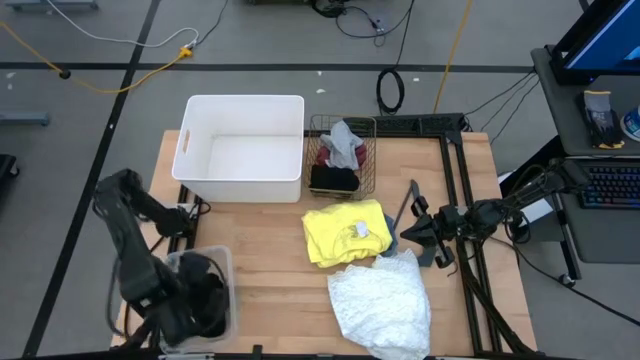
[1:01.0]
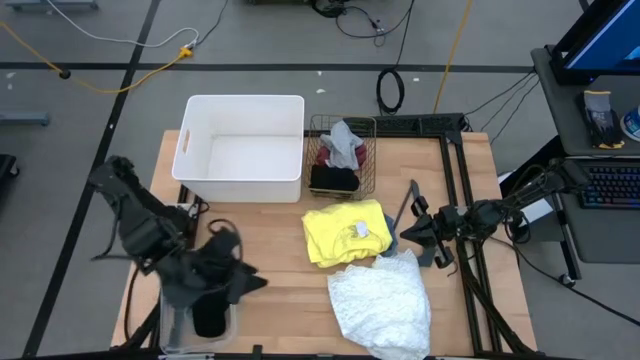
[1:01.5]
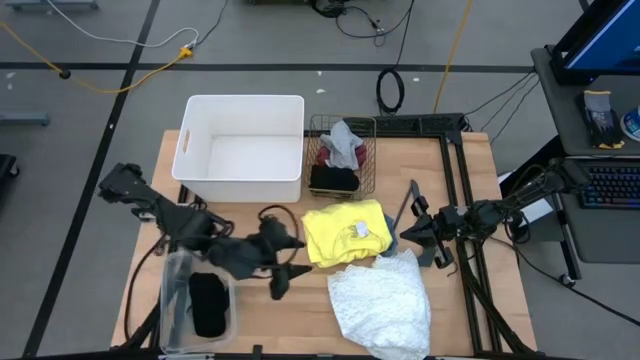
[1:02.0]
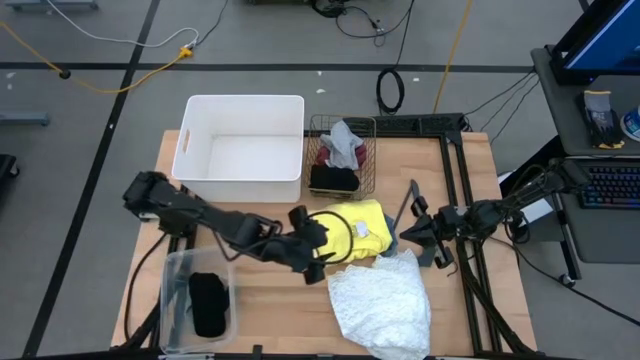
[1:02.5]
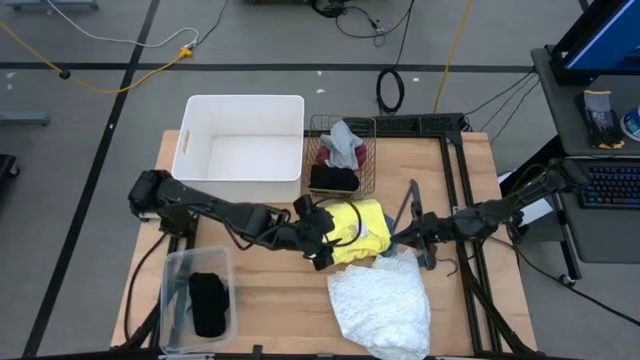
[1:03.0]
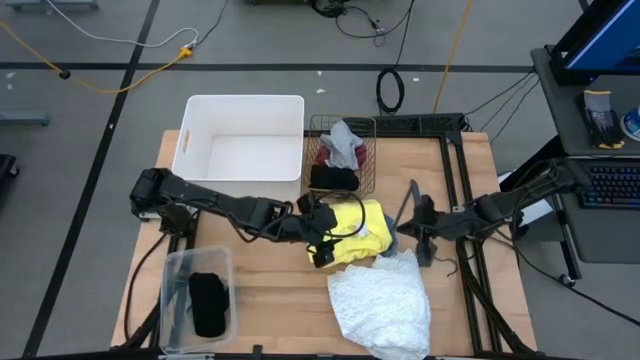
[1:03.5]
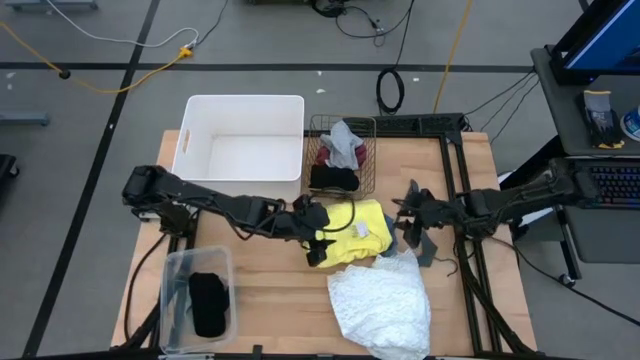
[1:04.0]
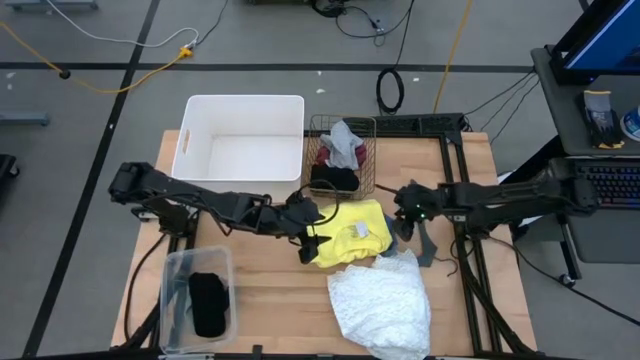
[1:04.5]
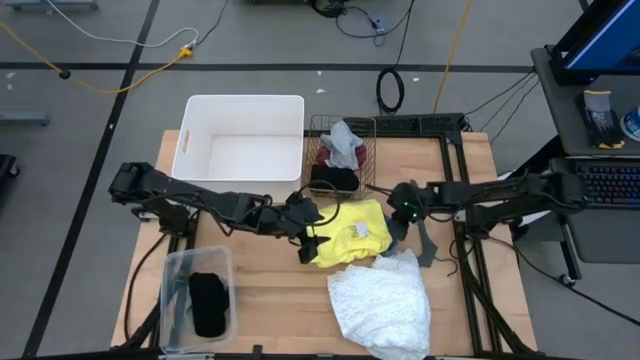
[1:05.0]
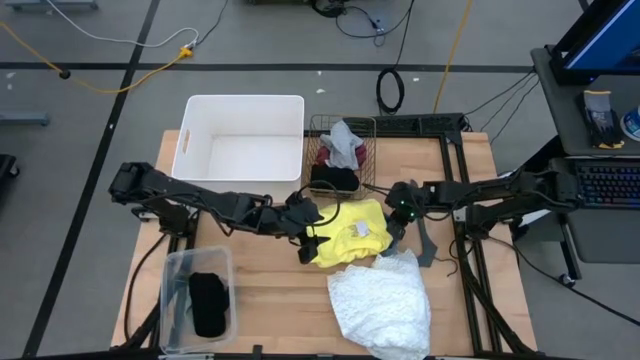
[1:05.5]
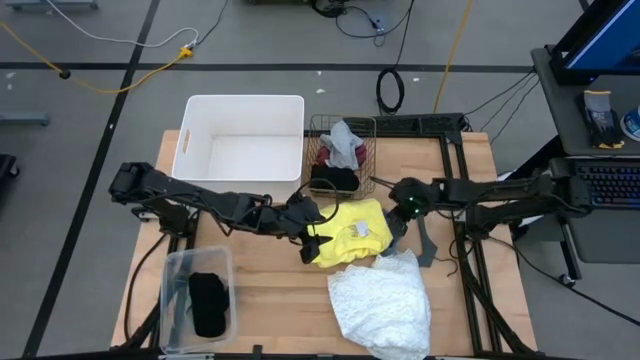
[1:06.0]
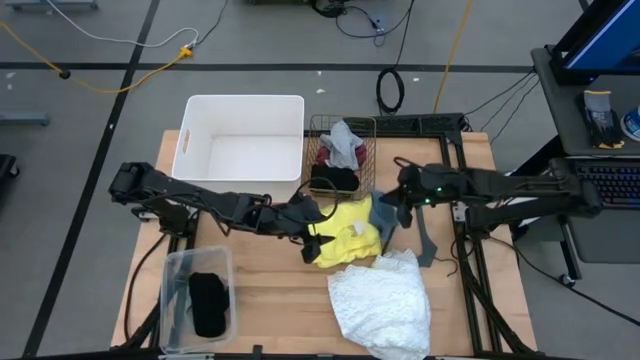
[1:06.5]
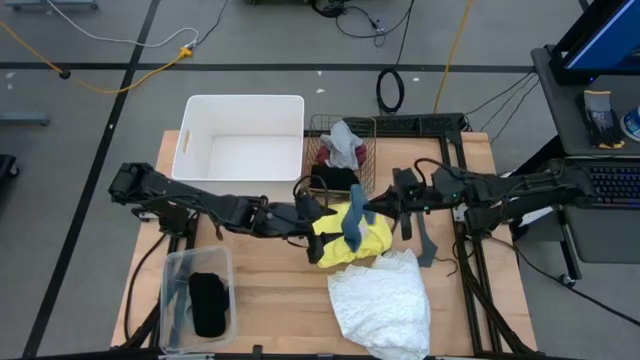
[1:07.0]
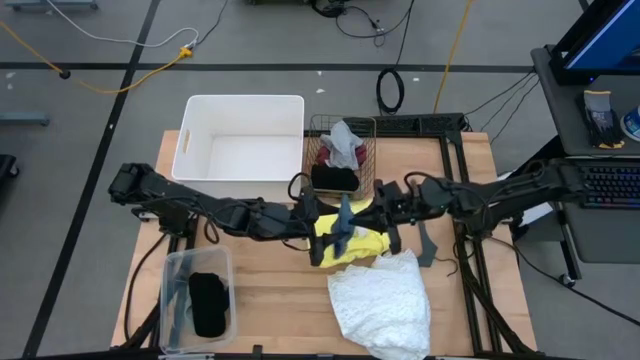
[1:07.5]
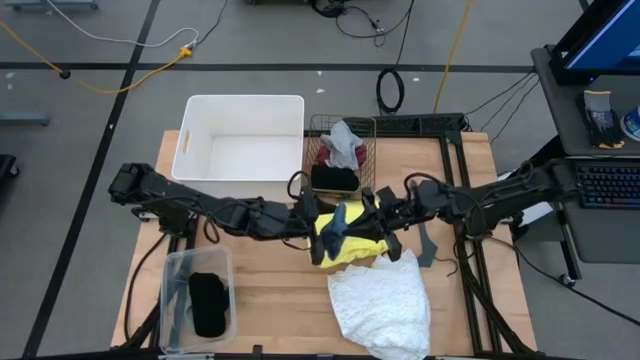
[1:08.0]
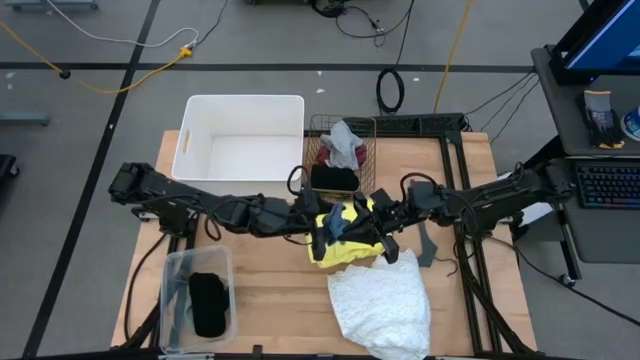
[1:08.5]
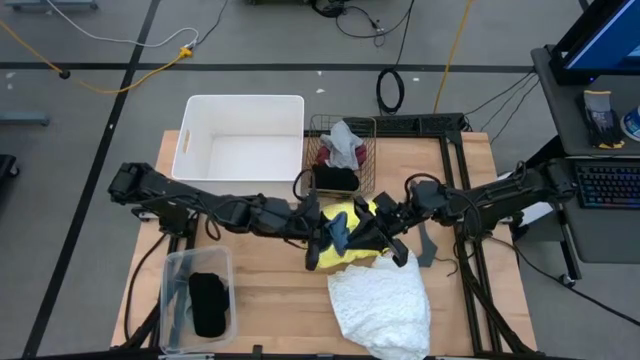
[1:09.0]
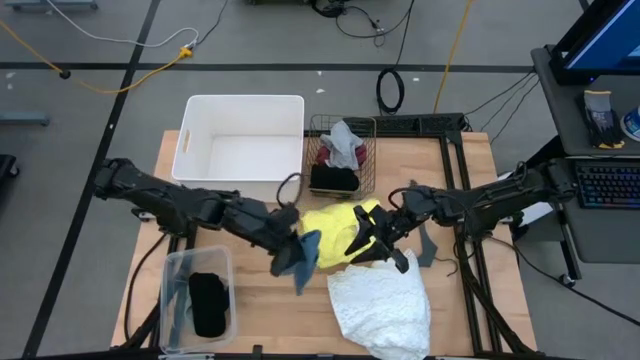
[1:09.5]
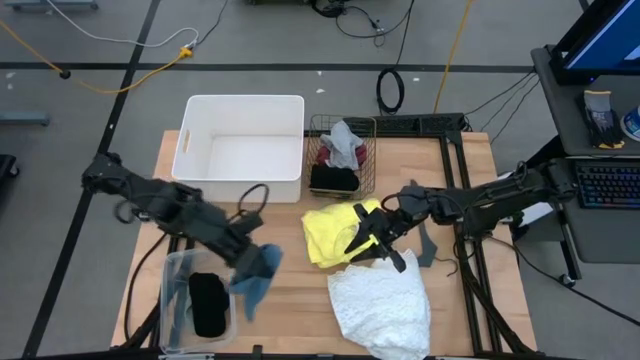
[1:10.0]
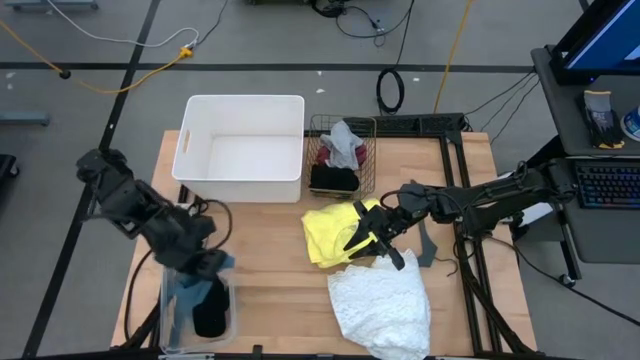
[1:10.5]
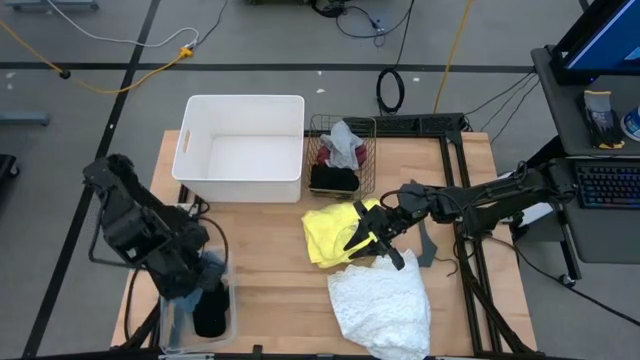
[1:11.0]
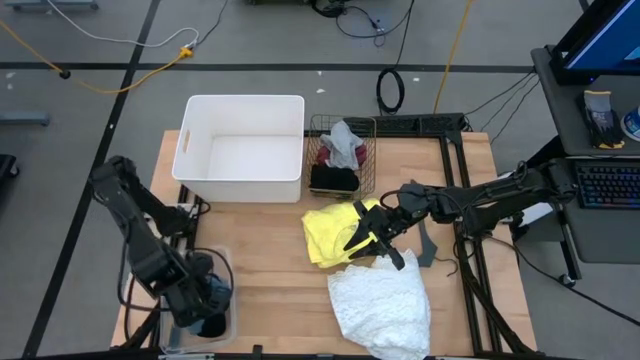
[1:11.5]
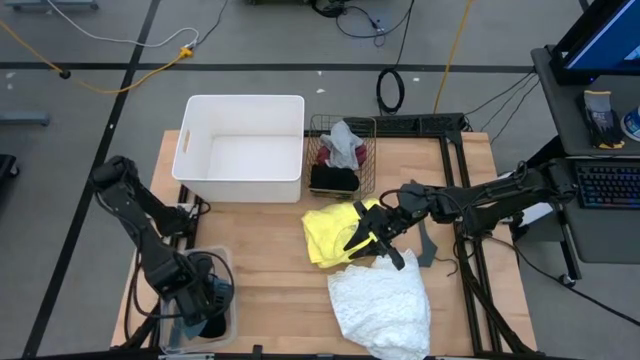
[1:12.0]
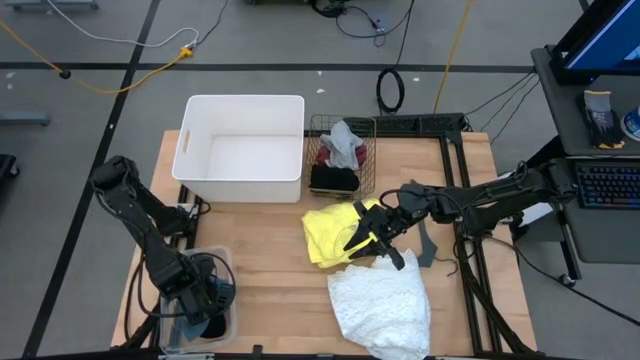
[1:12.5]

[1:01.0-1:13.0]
Task: Pick & Place Cloths
Put the gray sock into the transparent bin

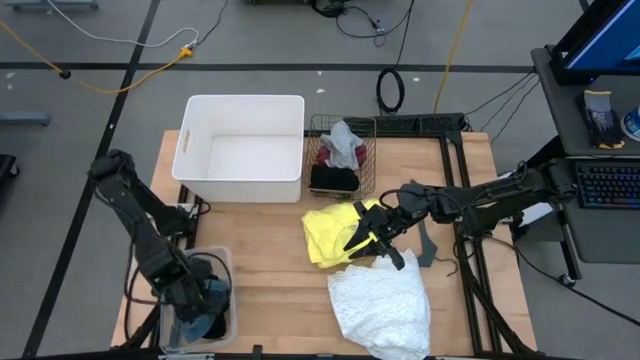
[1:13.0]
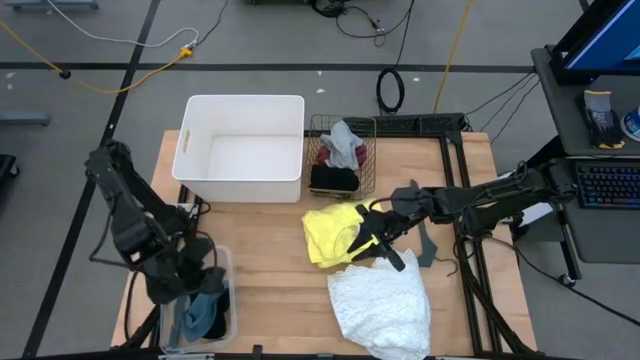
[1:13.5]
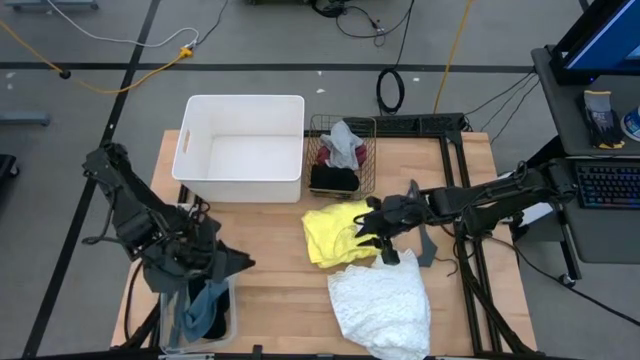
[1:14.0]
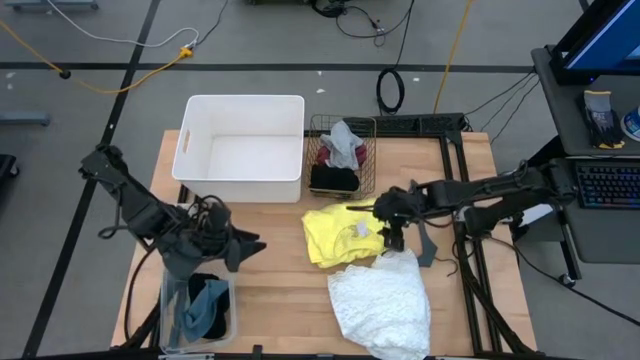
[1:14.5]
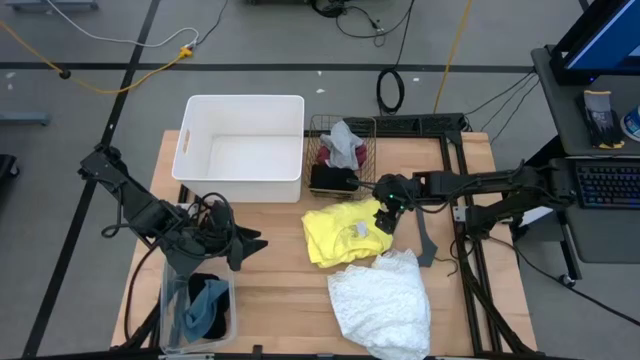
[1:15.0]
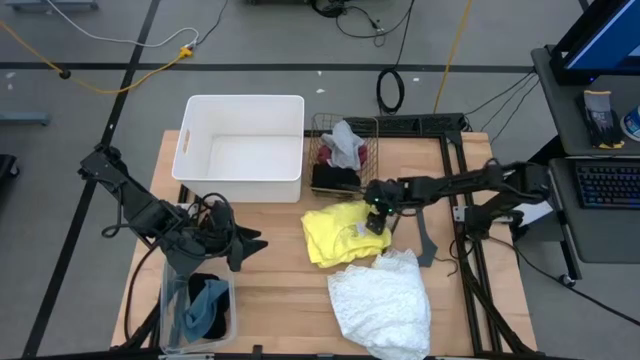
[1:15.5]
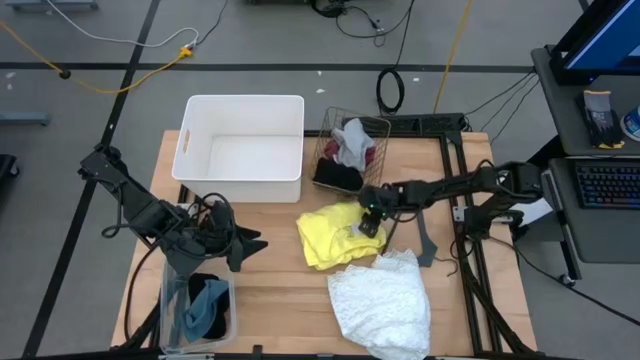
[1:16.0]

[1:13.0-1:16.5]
Put the yellow sweater into the white bin

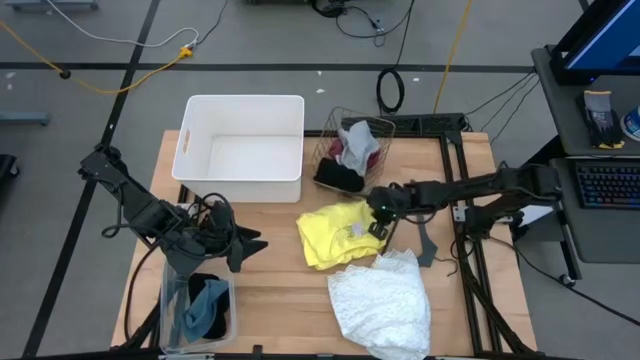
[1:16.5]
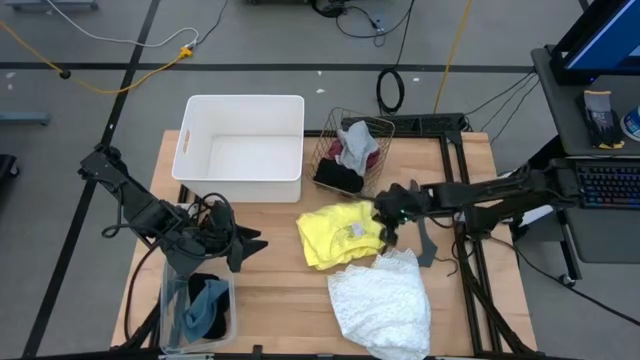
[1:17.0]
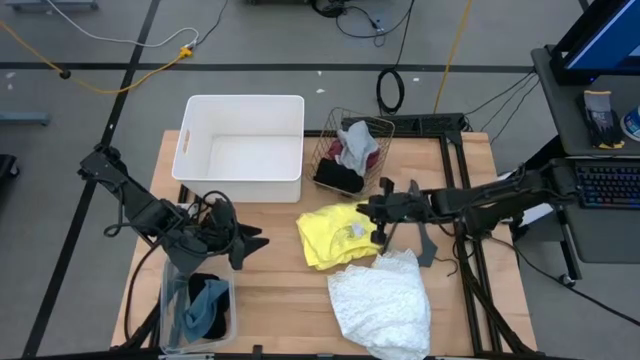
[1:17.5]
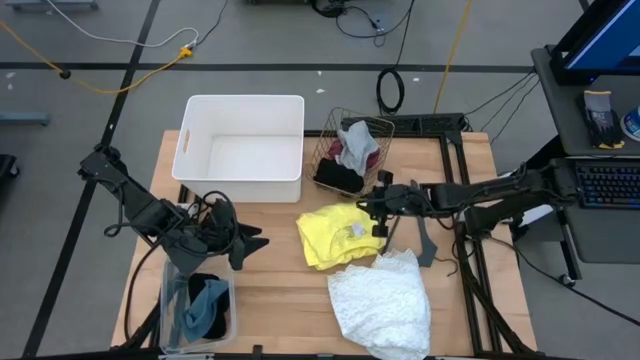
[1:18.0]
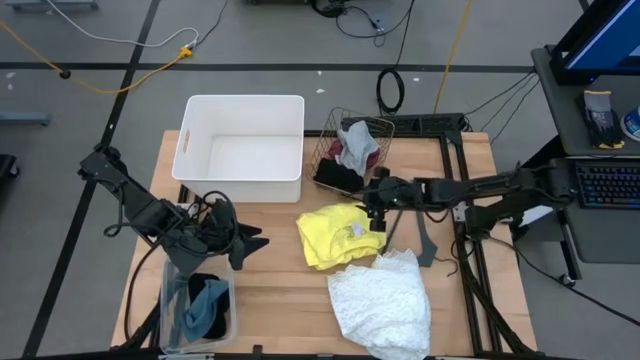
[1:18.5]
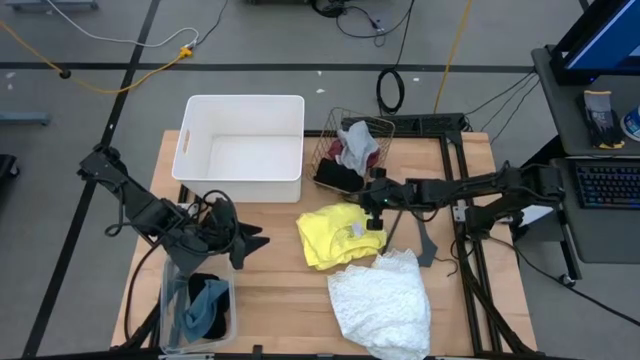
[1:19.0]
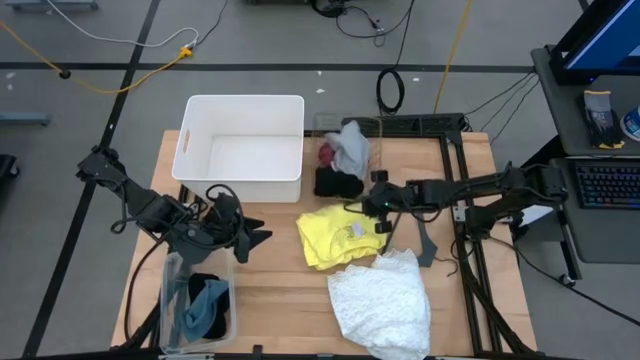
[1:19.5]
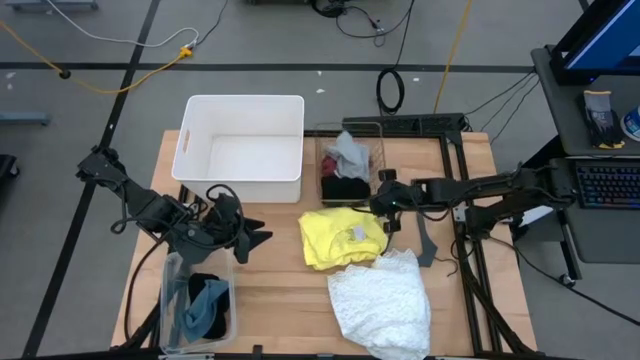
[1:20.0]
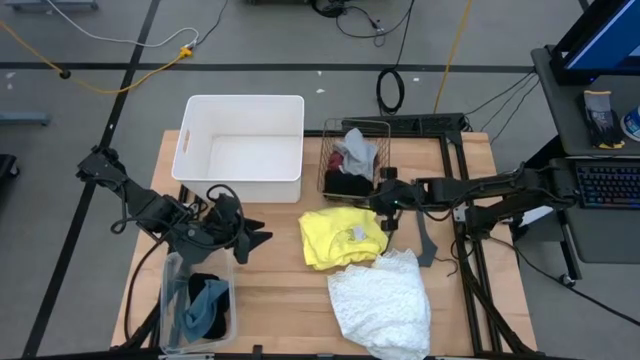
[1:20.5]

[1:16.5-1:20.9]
Adjust the wire basket

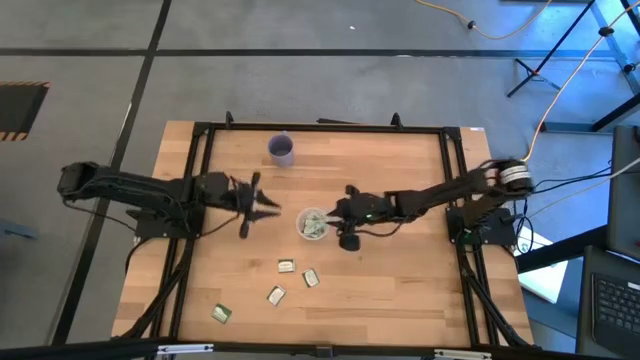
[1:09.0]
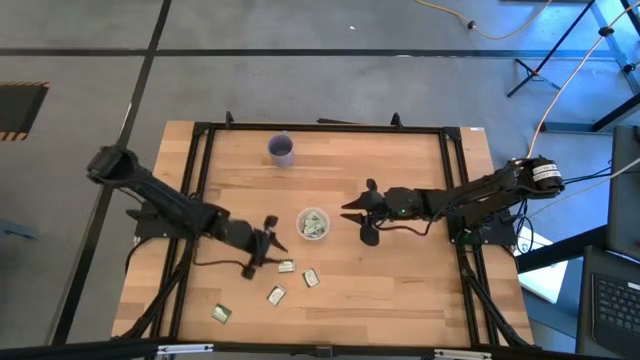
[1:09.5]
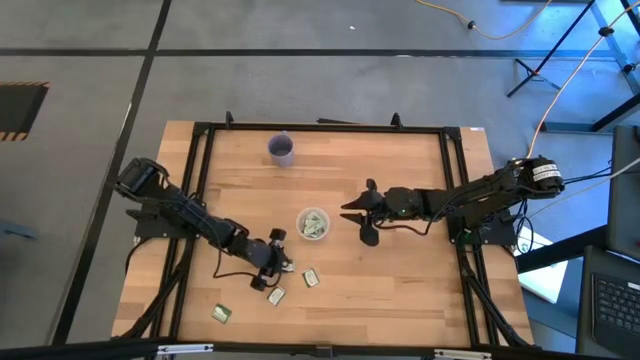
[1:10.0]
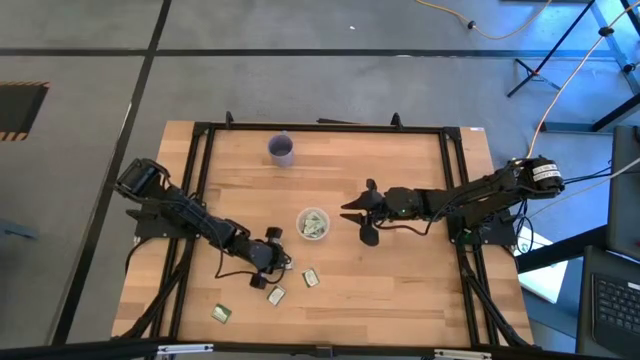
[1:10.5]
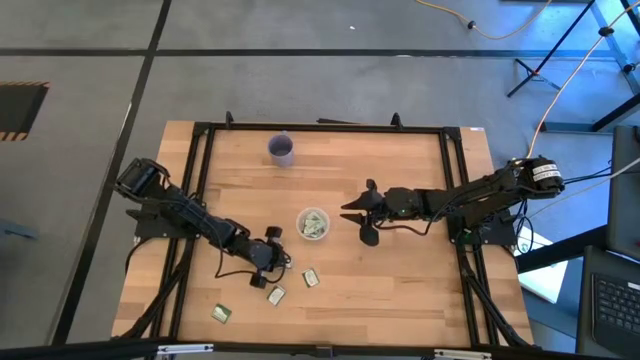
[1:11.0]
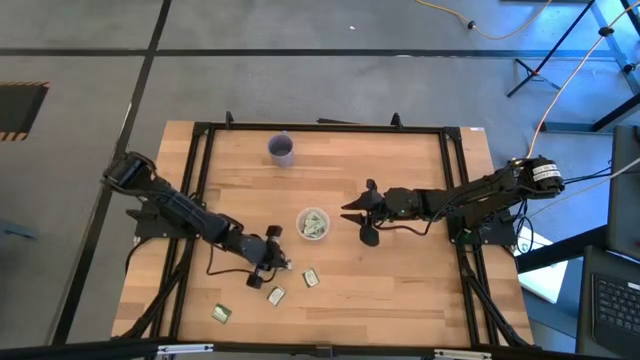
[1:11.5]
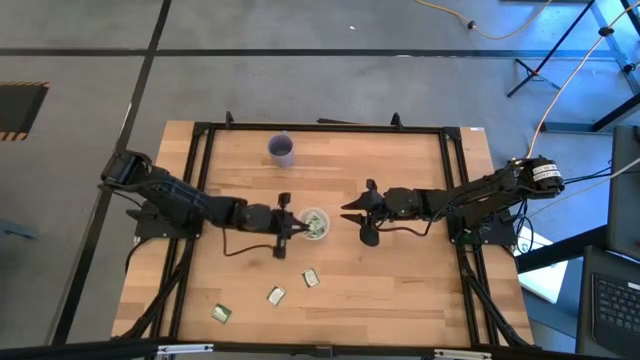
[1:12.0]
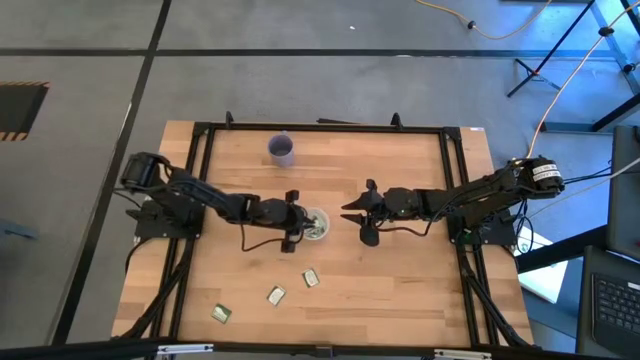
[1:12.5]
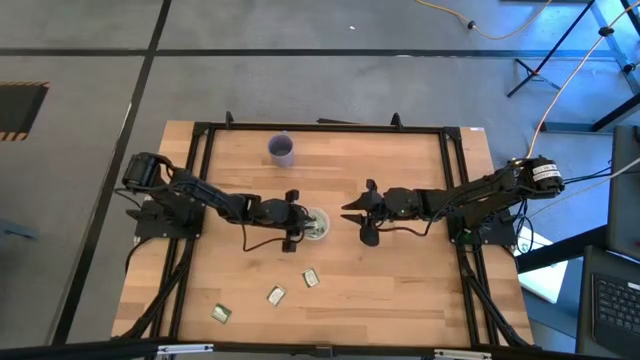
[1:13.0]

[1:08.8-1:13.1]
Task: Pick and place Stevia / Truvia into bins
Put the truvia packet into the transparent container
